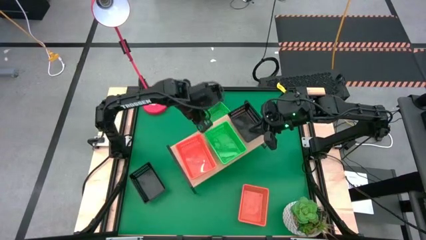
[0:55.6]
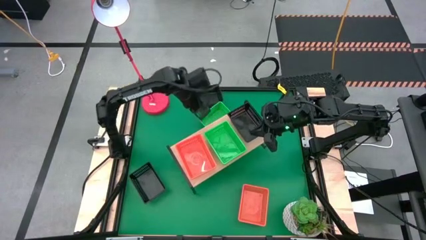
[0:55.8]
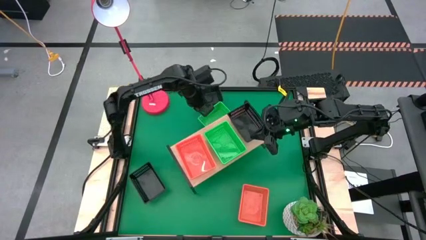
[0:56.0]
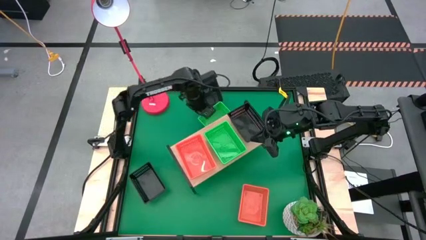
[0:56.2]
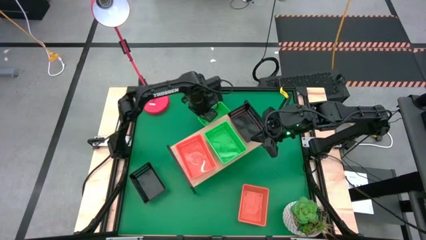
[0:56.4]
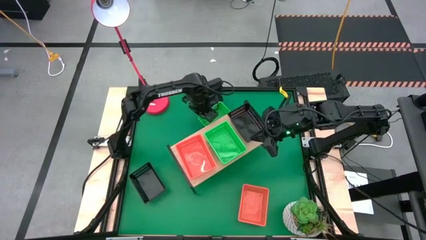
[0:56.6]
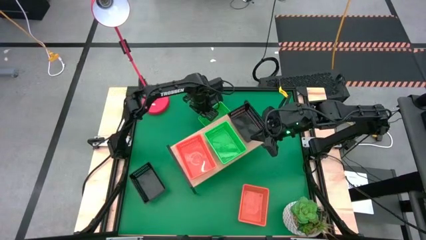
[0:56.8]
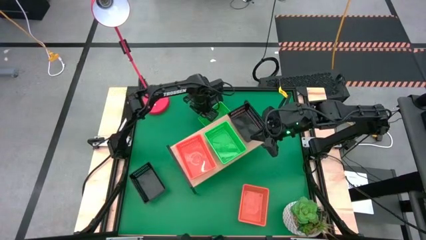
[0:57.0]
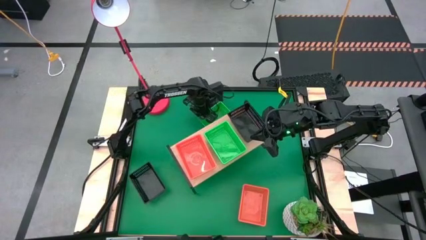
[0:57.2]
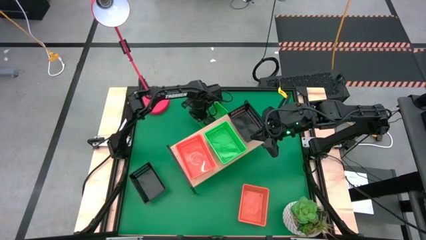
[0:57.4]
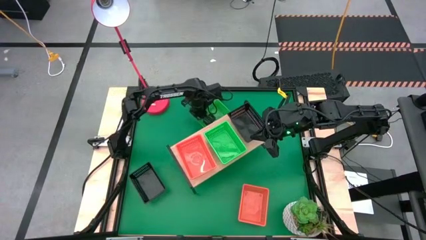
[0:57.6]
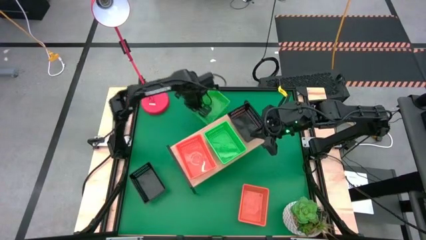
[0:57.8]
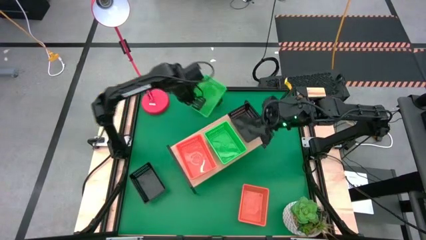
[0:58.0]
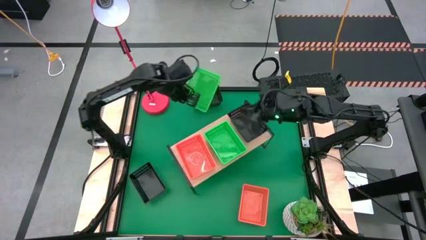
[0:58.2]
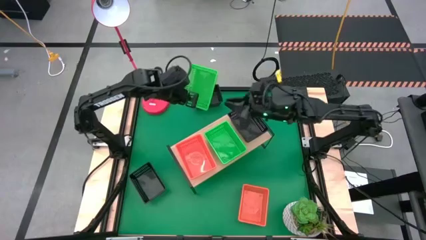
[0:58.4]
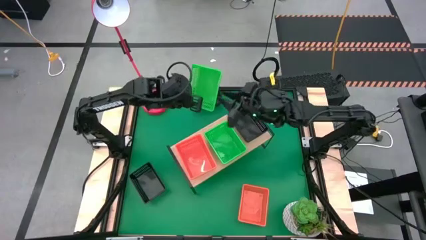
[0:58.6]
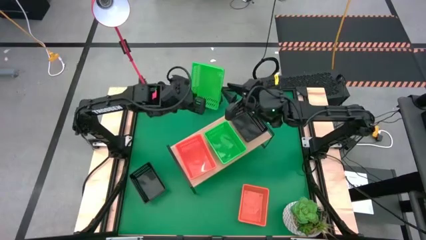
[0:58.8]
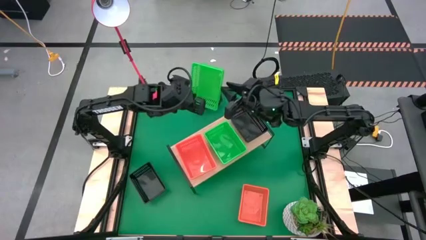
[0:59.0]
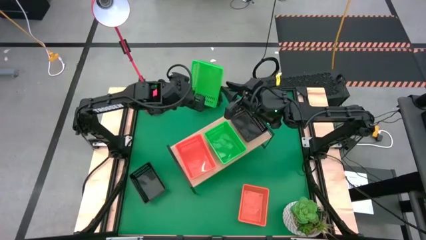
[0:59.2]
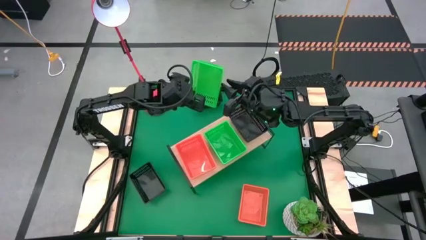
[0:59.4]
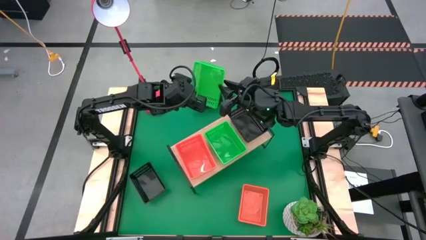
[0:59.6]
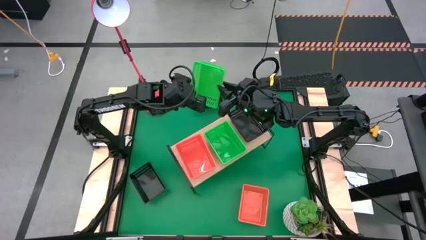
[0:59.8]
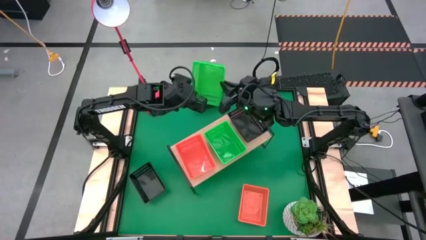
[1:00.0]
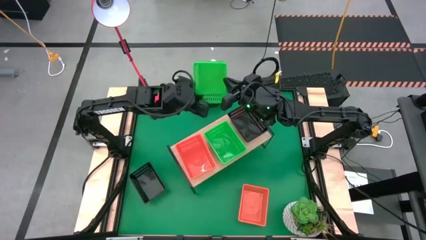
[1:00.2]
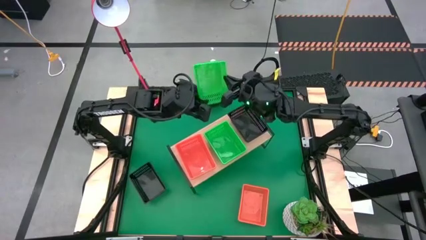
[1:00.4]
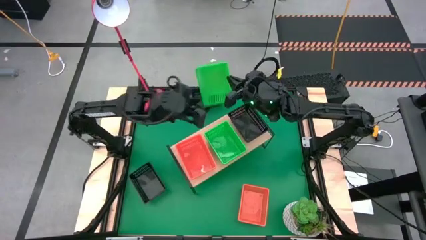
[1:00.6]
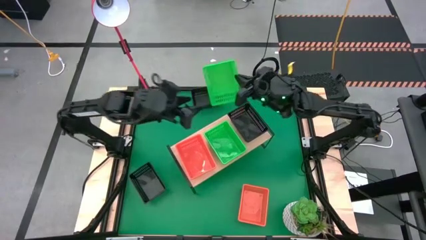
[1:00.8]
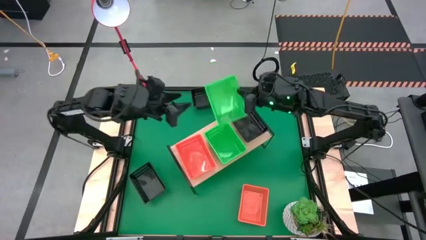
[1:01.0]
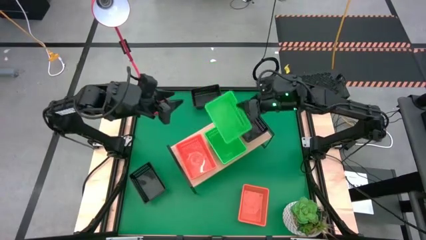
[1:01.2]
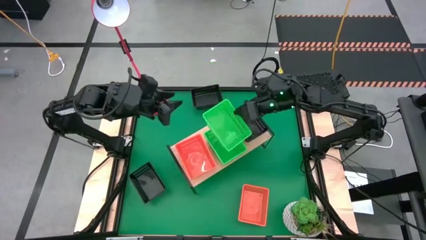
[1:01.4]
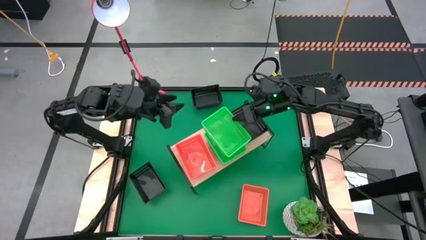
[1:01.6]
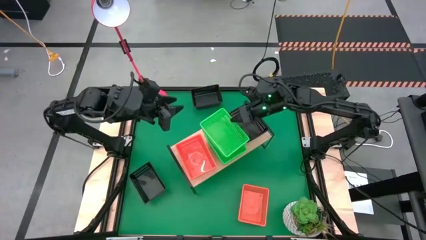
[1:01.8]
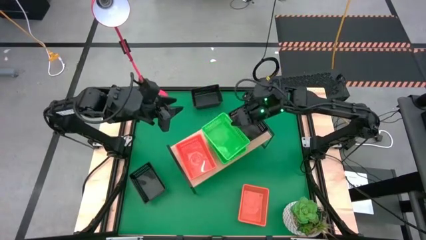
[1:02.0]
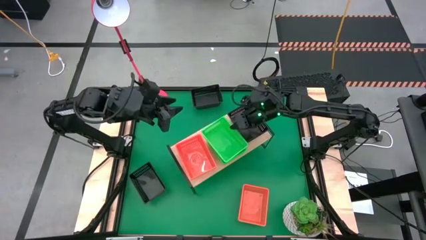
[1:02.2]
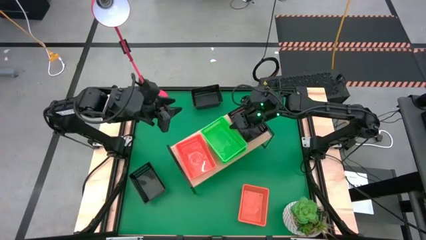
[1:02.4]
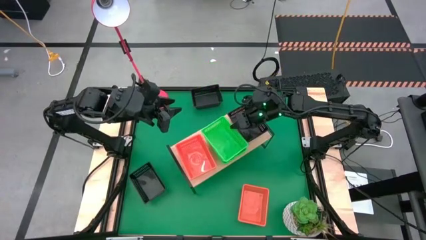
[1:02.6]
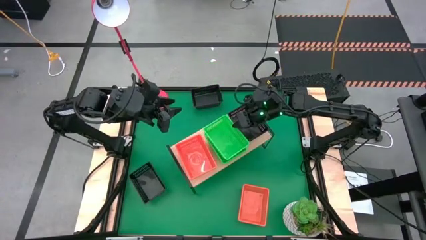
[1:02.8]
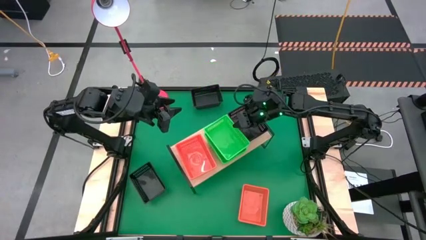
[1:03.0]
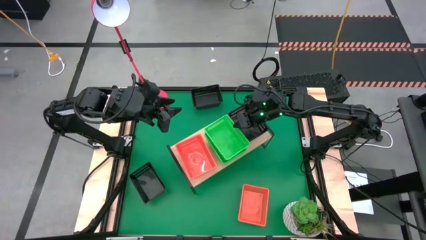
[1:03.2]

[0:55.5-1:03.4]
Task: Stack baskets on shelf by color
Stack the green bin on top of the green bins on the shelf

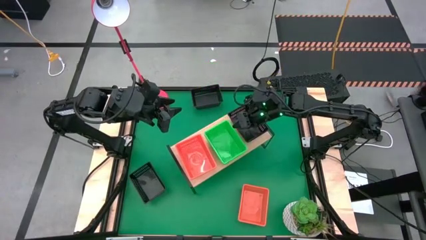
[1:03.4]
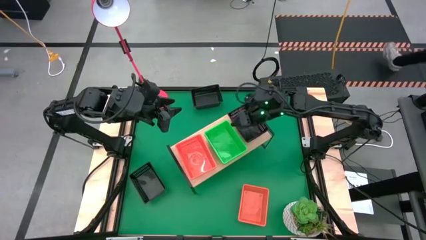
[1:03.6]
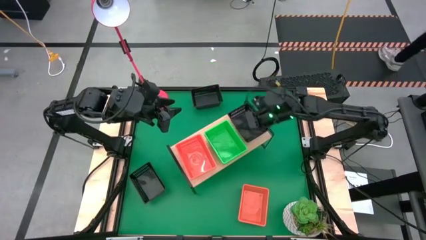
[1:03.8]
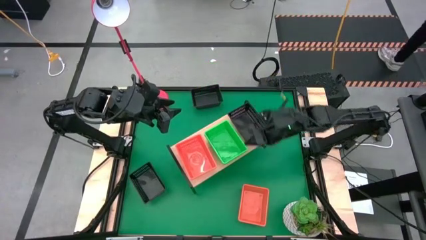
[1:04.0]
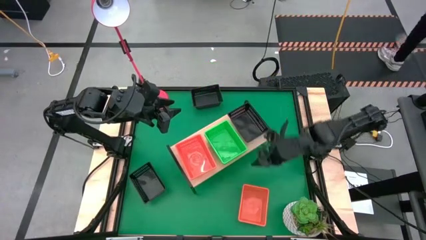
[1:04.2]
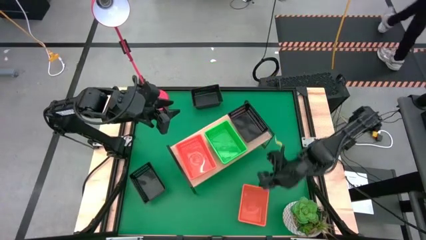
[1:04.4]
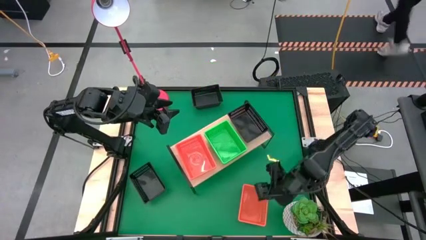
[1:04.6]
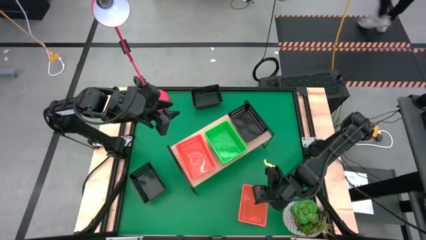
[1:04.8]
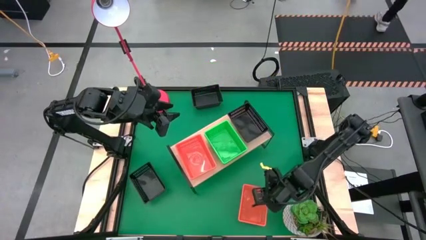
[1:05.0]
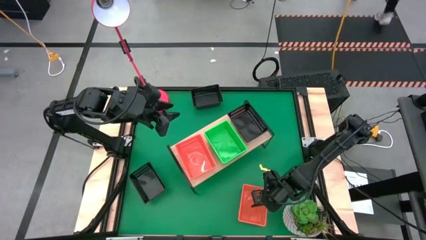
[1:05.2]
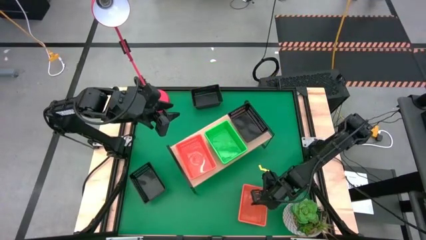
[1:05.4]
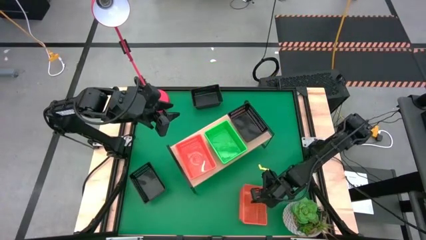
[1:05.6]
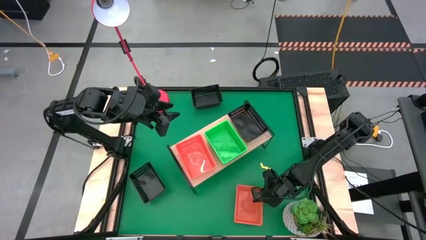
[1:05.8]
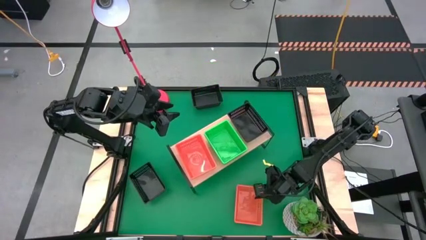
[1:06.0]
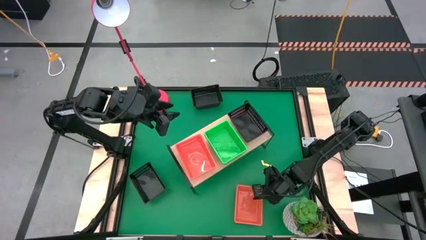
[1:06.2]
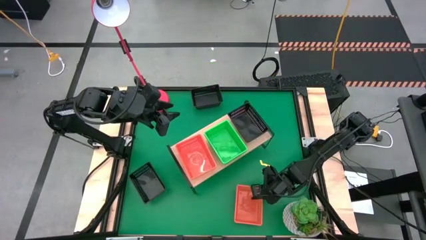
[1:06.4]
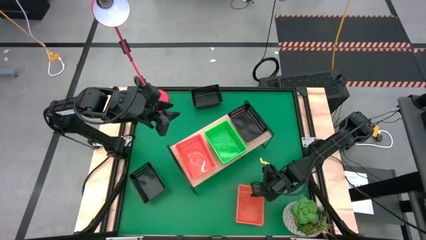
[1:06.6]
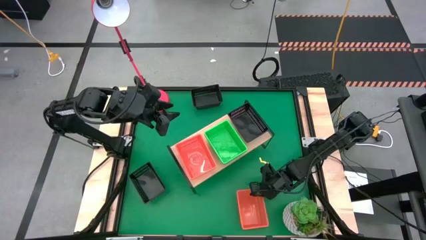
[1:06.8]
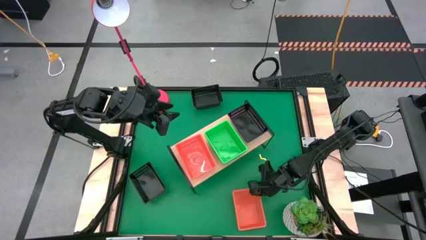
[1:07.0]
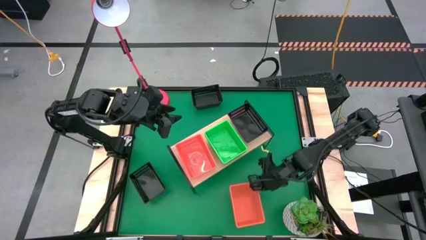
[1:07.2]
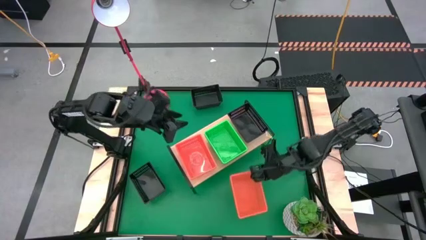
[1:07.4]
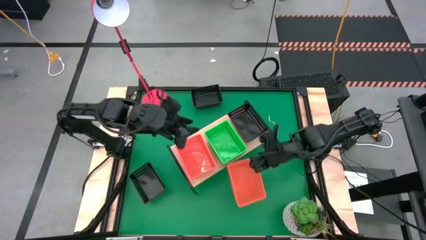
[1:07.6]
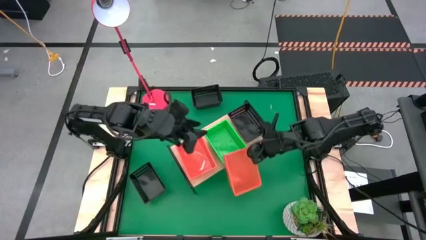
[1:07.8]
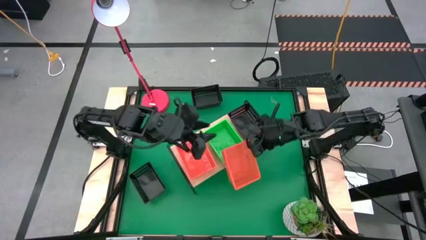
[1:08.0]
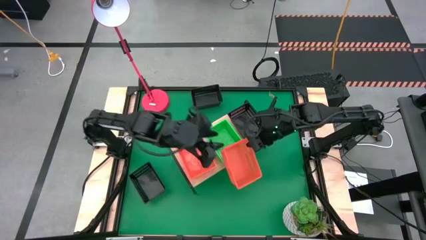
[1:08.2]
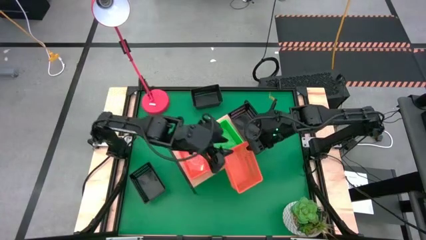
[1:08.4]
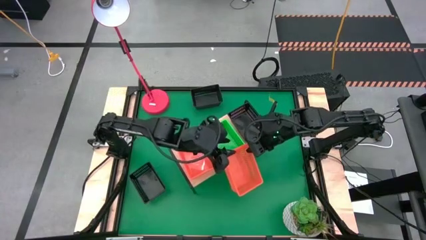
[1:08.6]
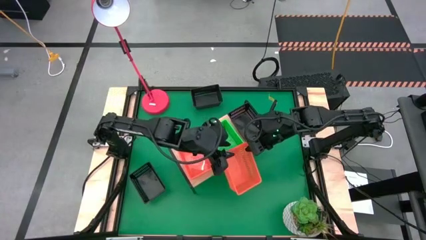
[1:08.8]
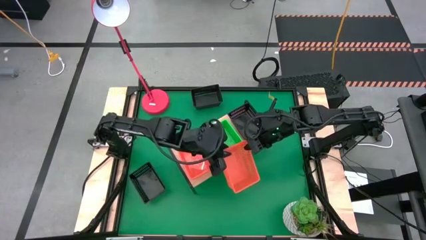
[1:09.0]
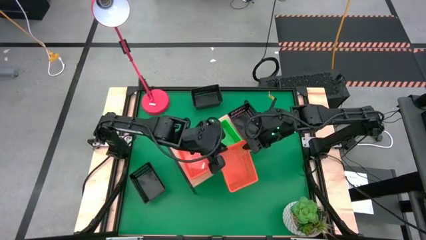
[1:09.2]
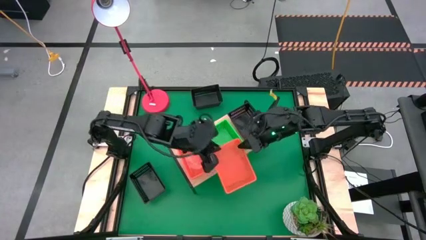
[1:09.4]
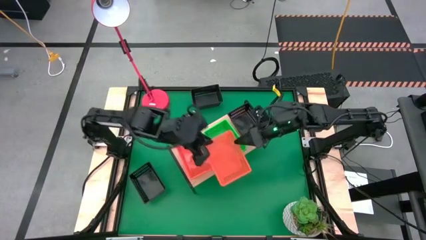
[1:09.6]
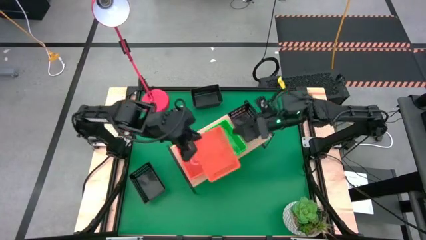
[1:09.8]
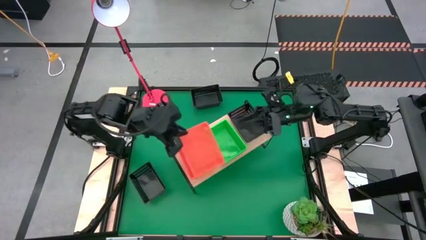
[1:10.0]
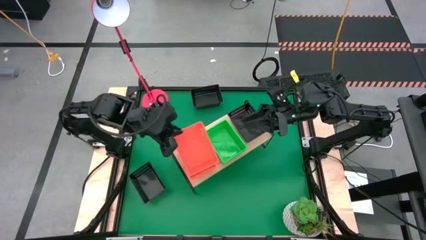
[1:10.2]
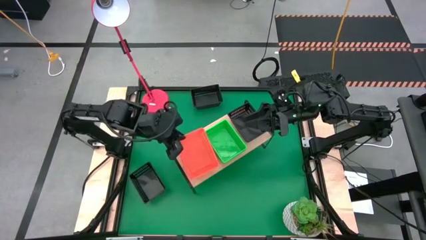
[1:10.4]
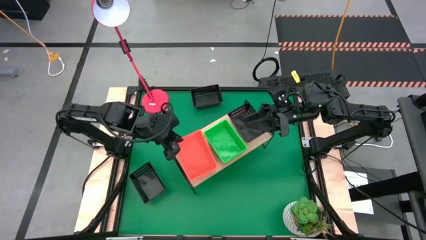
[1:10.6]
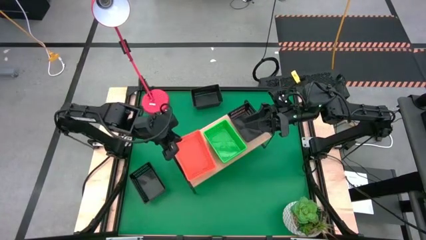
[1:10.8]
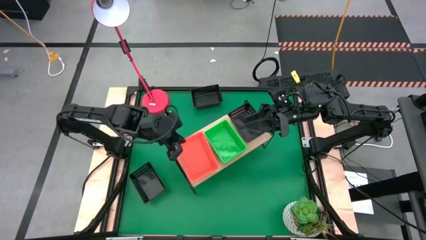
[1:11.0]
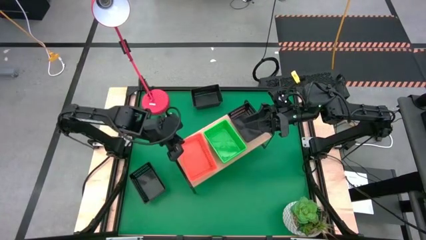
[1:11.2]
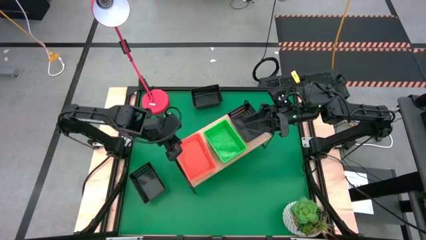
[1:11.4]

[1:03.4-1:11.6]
Stack the orange bin on top of the orange bins on the shelf

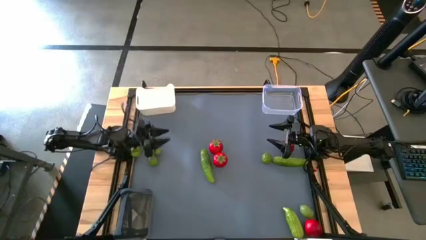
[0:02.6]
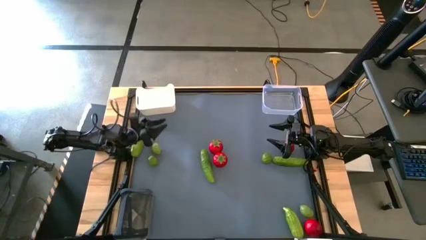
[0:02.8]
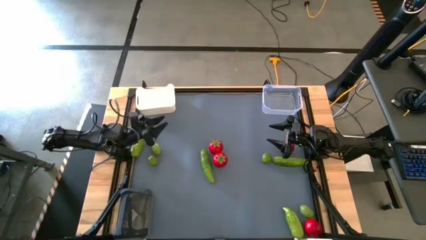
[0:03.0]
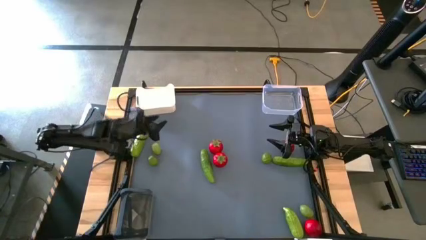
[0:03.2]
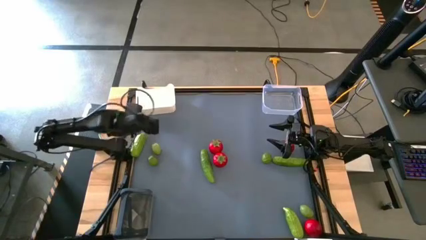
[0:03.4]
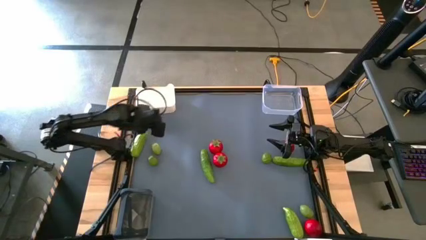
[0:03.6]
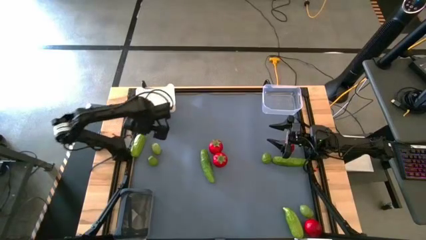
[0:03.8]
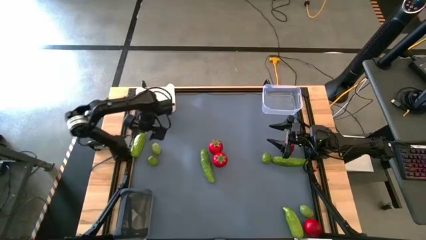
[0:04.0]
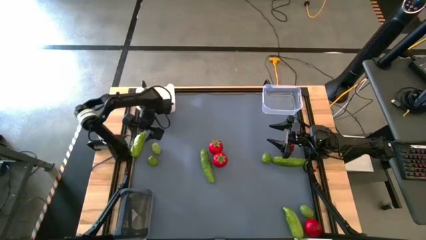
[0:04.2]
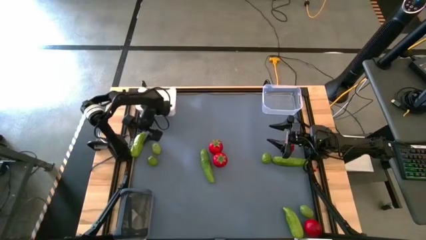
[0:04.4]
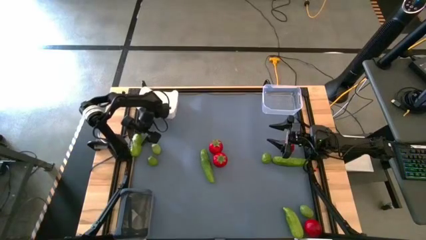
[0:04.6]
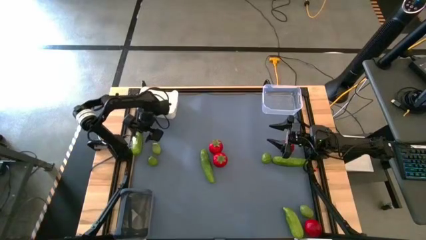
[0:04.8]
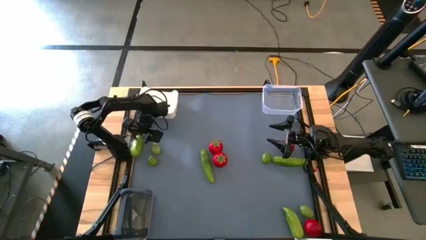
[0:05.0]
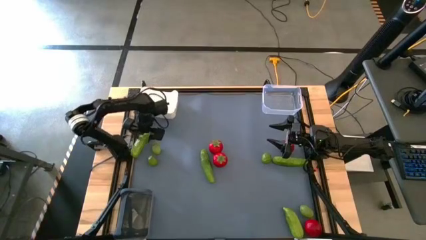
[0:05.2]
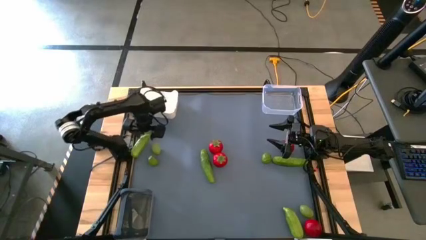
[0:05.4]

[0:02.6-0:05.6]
Task: Sort produce into baskets
Put the top left cucumber into the white bin
